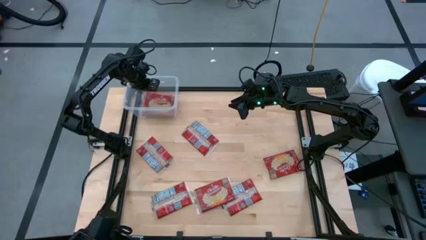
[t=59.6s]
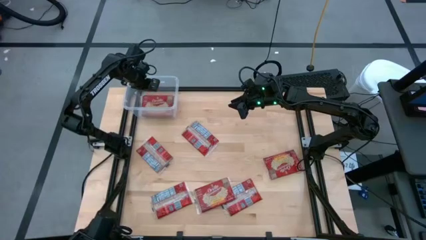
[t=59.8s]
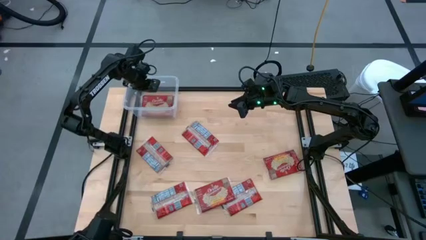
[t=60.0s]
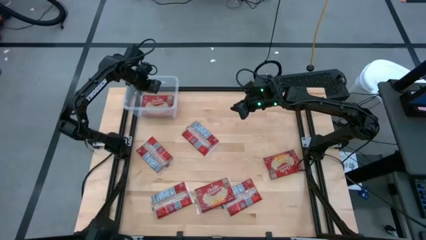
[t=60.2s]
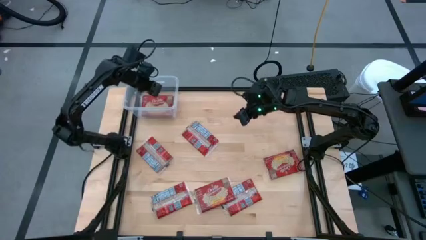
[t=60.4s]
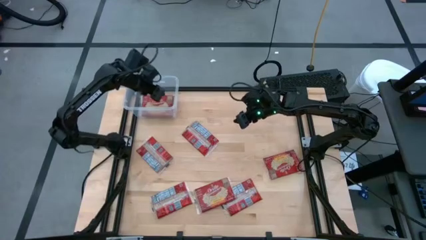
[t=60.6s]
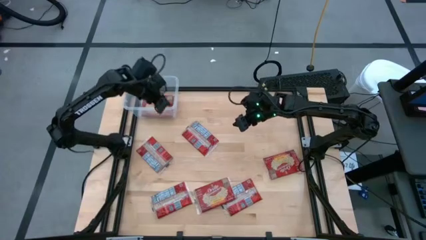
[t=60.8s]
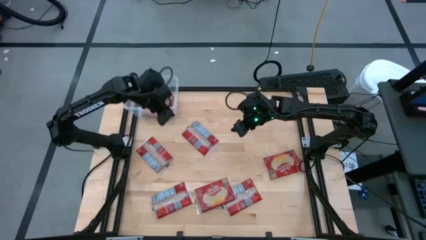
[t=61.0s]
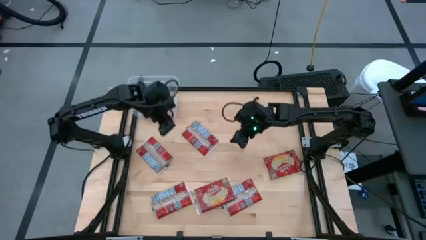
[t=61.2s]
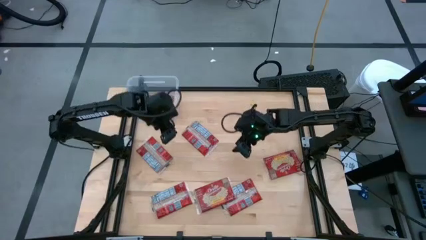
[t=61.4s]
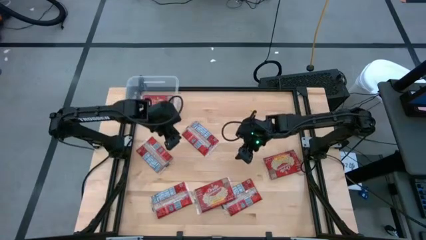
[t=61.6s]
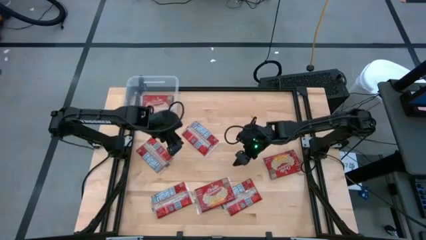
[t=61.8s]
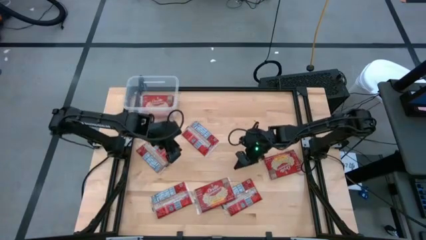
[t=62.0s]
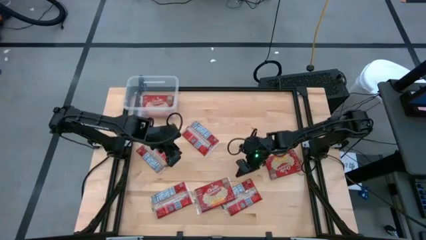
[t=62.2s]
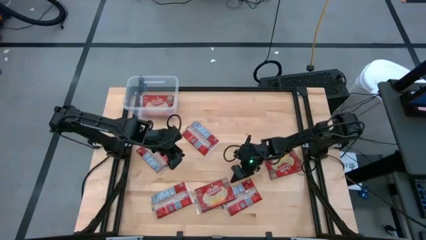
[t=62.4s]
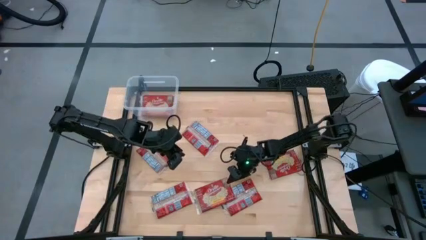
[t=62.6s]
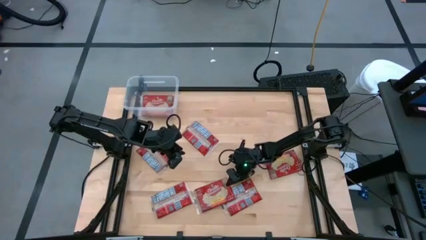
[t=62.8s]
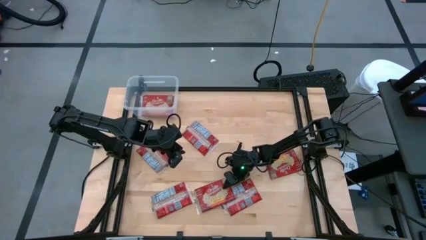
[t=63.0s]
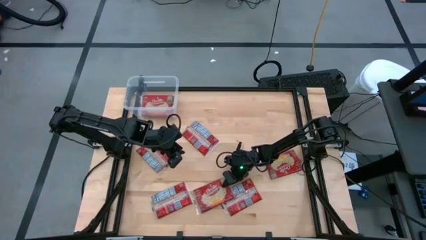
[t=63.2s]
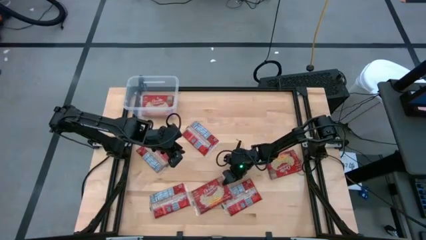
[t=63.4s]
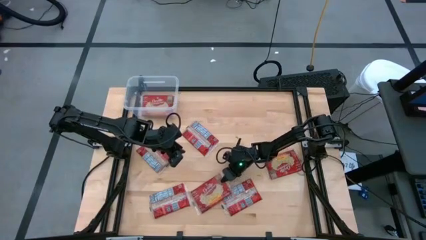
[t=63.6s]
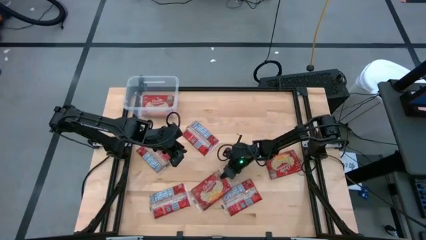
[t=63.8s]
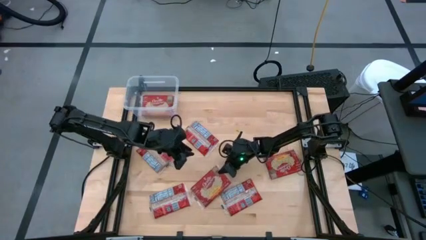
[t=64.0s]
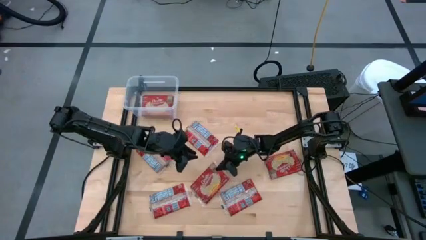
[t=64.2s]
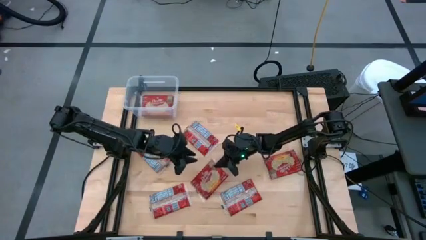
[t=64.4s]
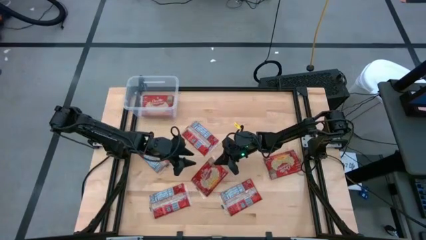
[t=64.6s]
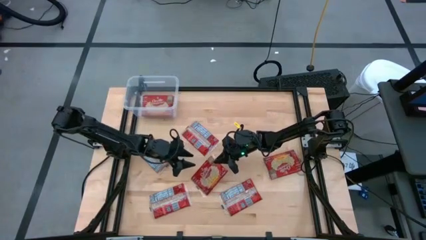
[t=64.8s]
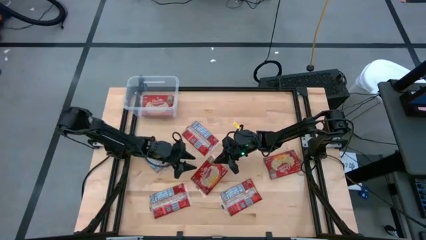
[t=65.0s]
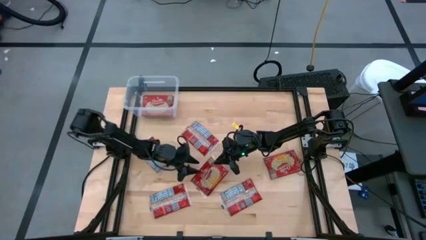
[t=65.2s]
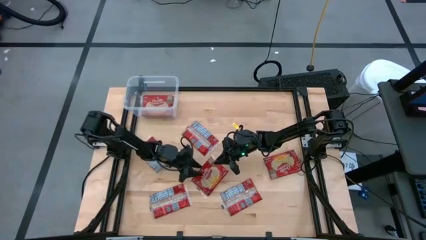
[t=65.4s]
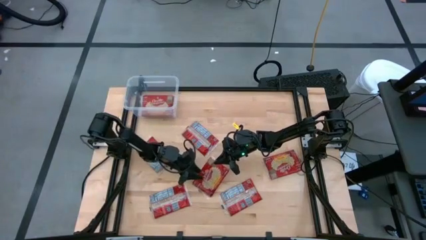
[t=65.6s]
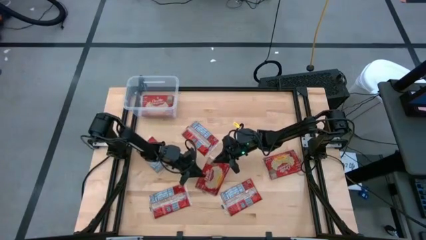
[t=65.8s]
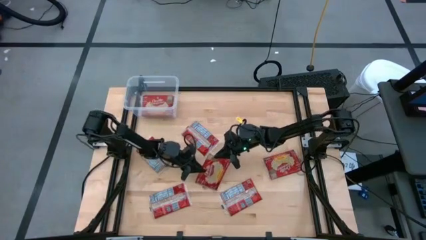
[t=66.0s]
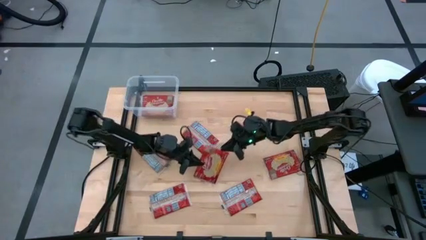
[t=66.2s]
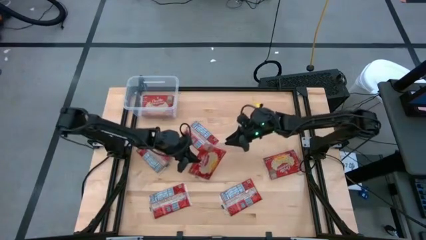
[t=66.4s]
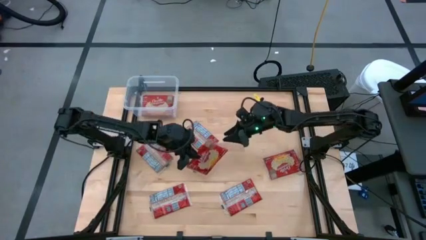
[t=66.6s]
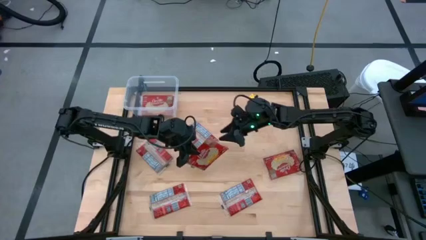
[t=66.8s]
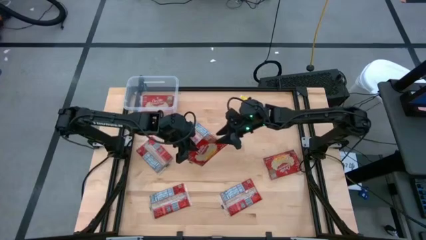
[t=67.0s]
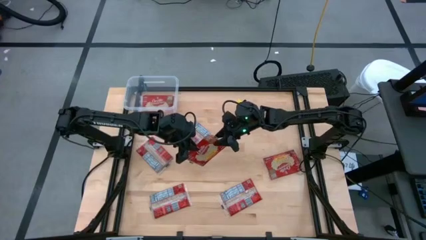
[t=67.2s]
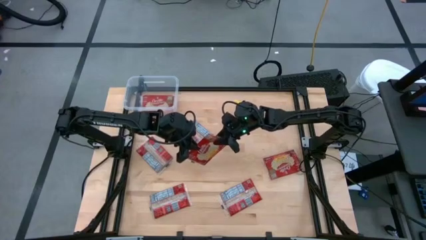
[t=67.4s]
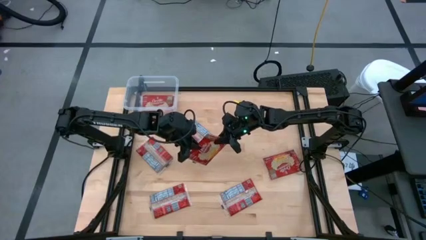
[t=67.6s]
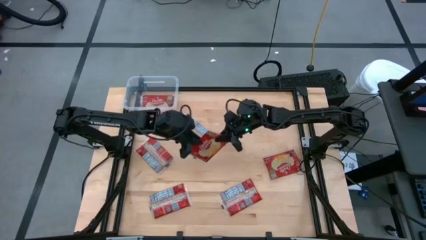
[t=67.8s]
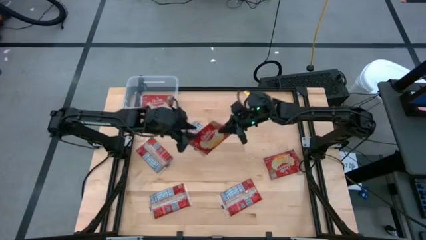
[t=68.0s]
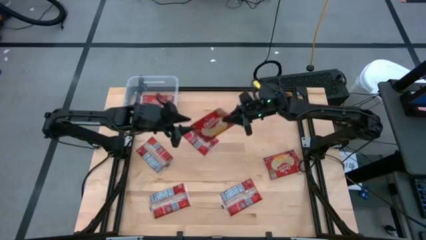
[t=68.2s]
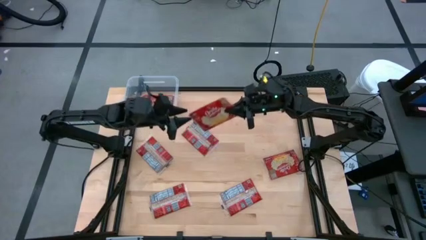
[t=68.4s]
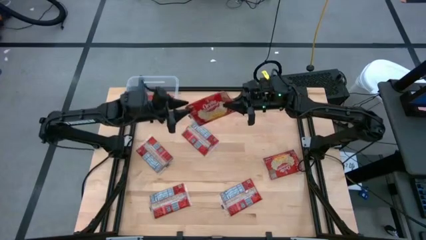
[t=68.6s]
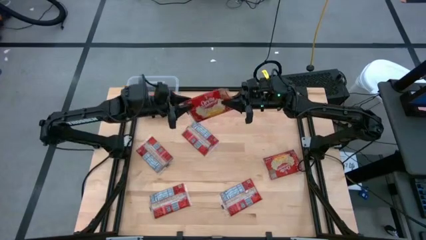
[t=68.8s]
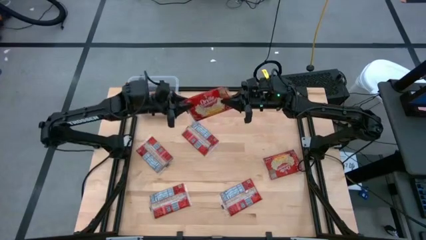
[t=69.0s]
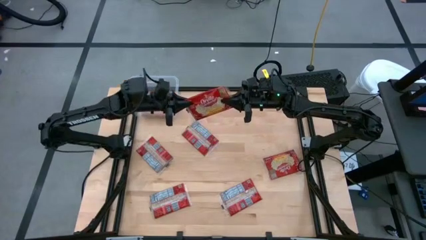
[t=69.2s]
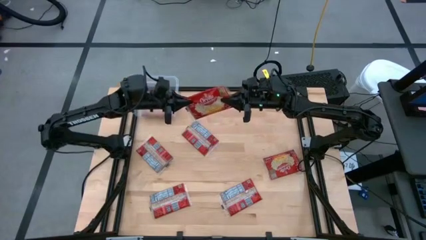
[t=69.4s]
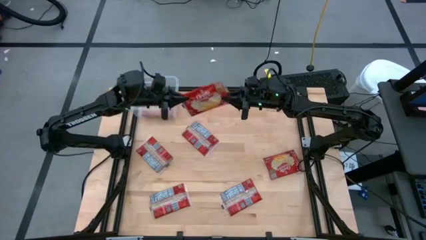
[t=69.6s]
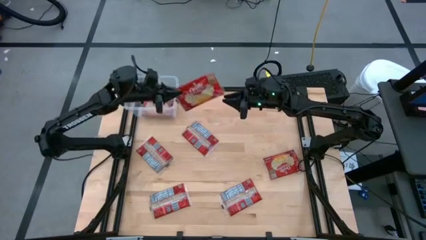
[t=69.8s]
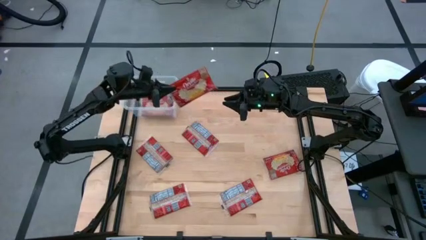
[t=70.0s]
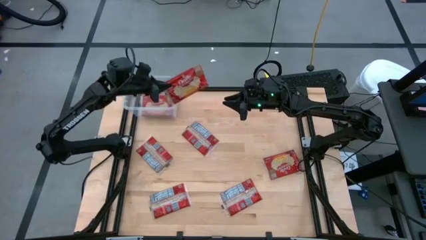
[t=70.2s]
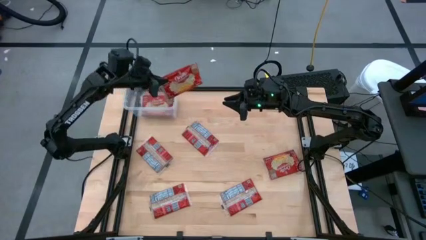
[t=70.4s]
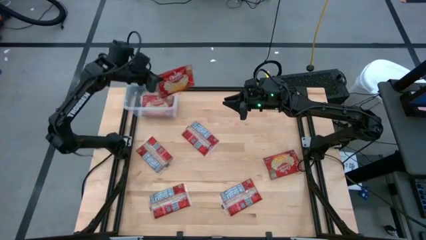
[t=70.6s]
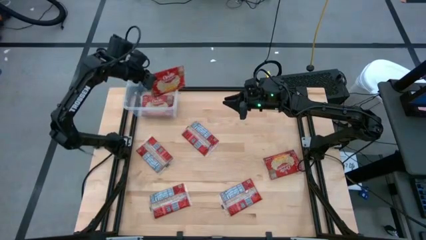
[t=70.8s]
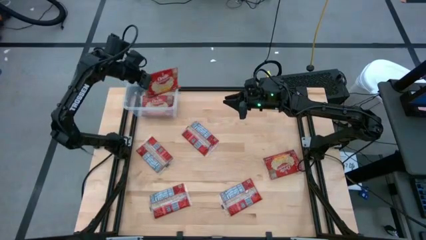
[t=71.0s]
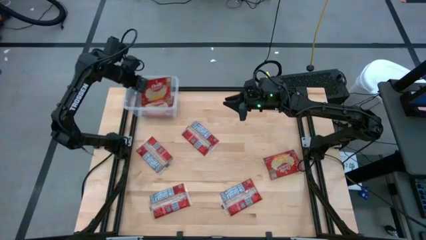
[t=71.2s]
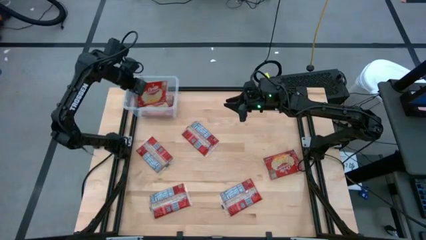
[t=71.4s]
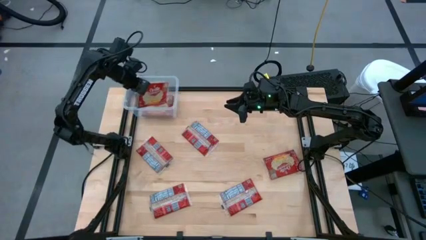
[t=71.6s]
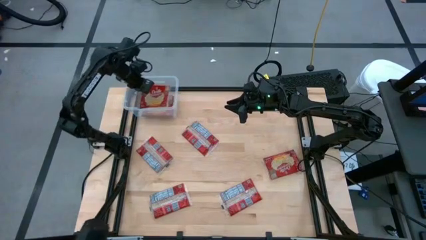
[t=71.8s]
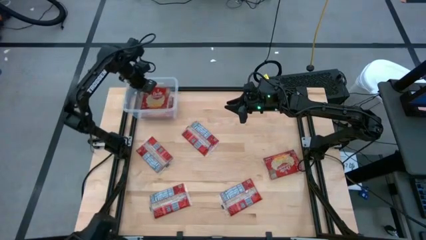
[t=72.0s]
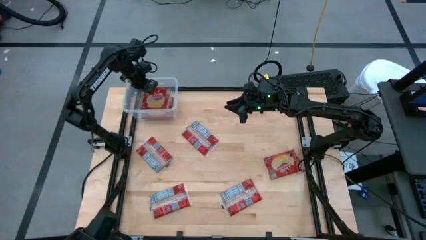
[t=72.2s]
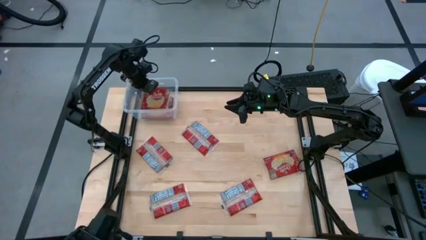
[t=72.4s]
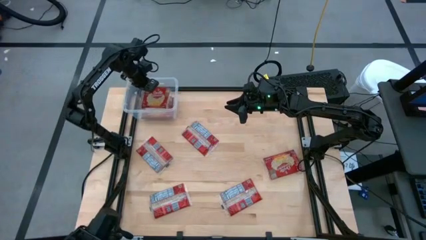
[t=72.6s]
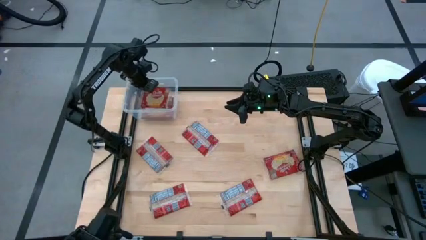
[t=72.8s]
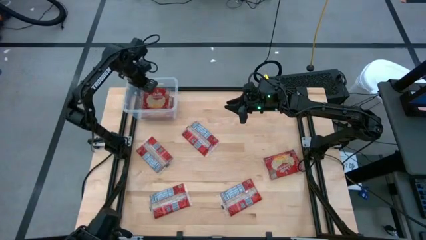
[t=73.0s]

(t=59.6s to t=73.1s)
Task: Sort popcorn bags into baskets
Put the popcorn pack into the transparent bin

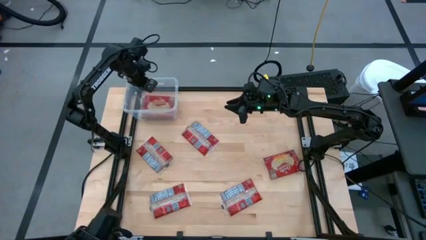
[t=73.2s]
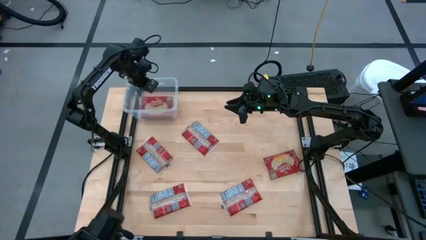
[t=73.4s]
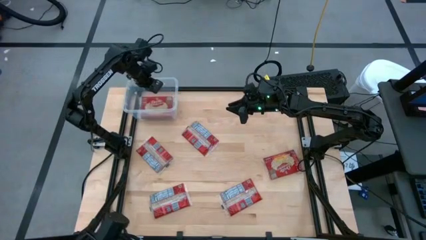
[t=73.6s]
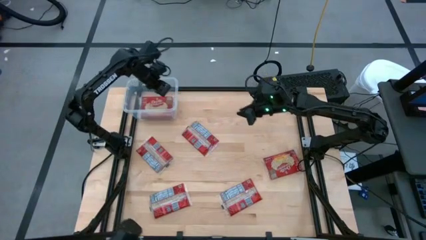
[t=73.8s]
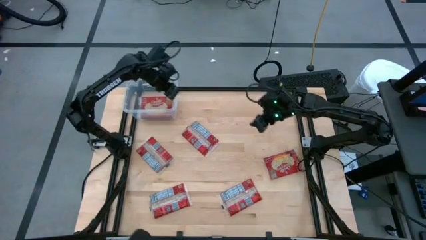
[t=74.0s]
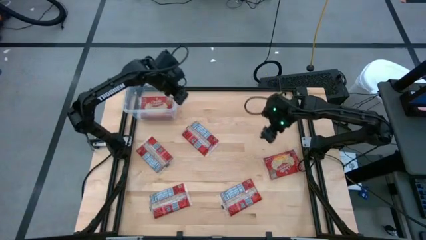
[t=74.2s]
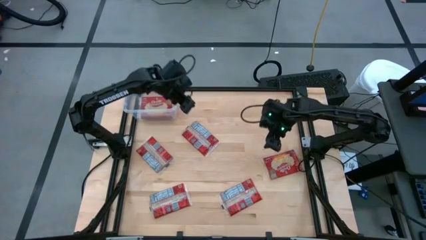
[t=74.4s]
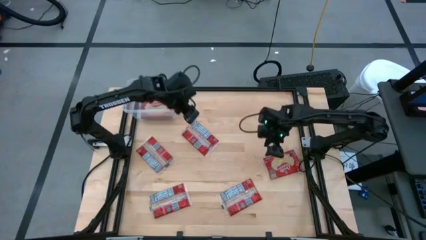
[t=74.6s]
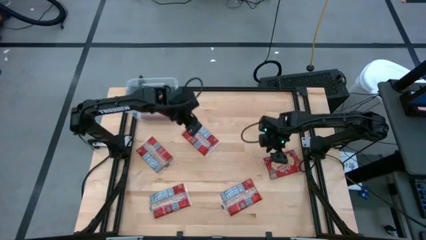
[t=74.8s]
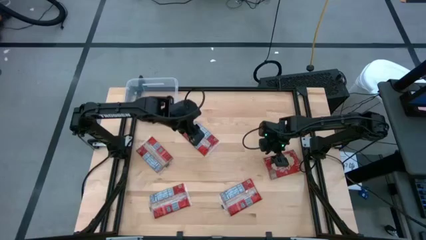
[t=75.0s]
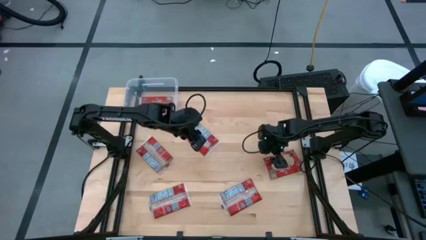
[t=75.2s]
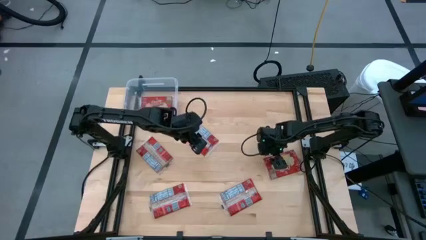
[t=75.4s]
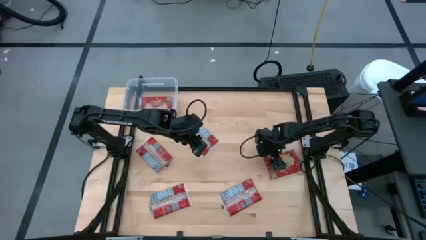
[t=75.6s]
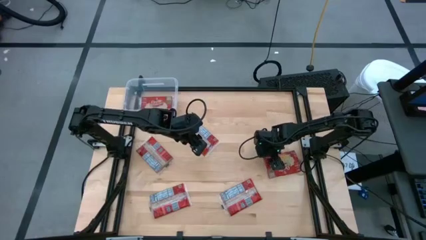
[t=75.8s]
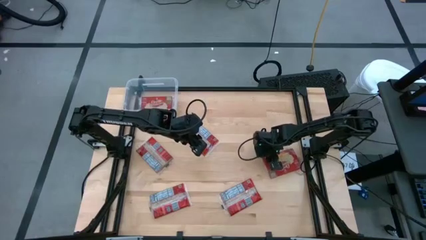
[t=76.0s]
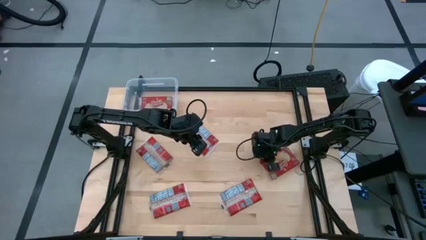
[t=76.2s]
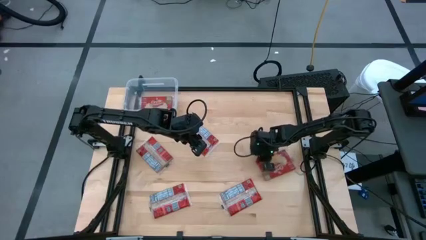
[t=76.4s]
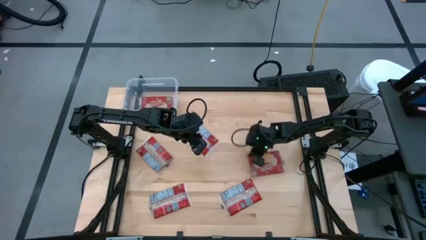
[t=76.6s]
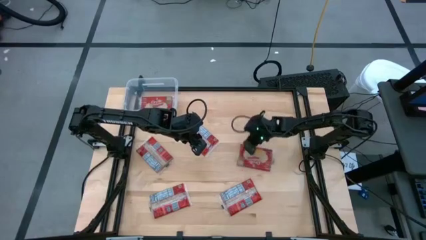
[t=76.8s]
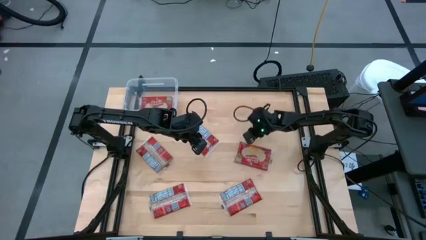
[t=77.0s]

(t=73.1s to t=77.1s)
Put the popcorn pack into the transparent bin
